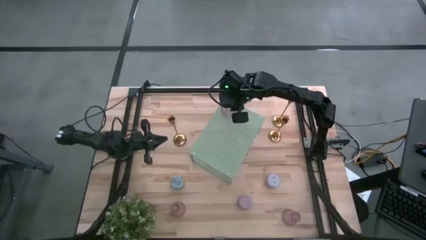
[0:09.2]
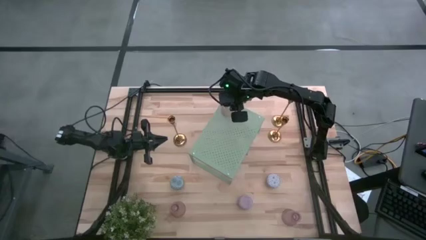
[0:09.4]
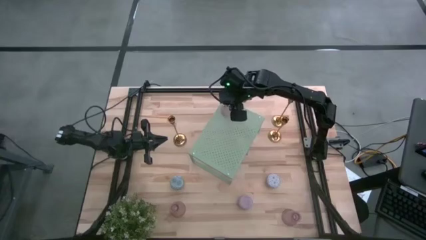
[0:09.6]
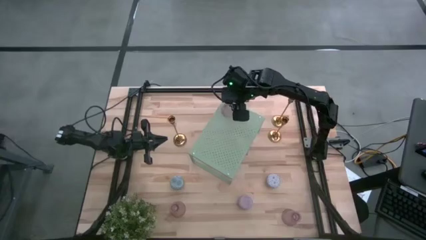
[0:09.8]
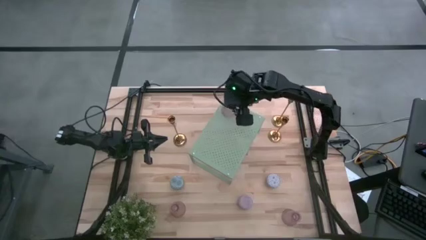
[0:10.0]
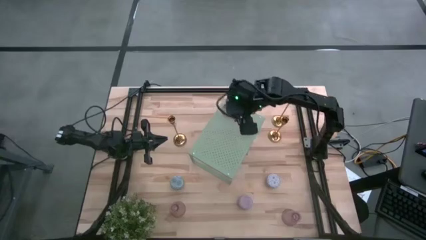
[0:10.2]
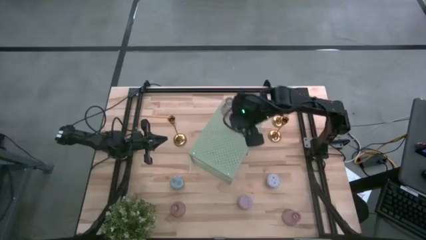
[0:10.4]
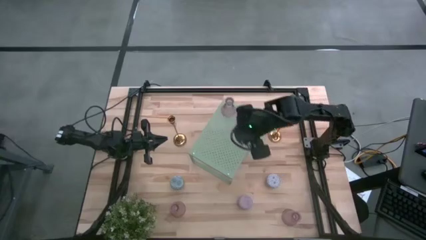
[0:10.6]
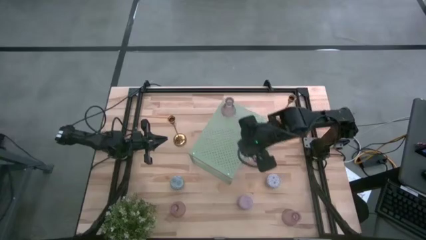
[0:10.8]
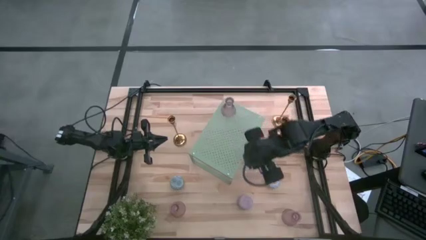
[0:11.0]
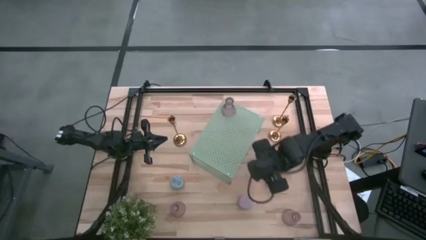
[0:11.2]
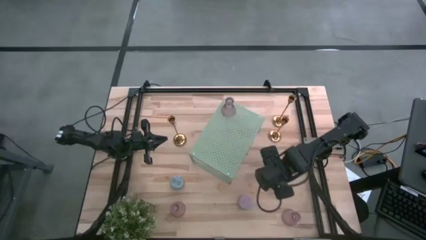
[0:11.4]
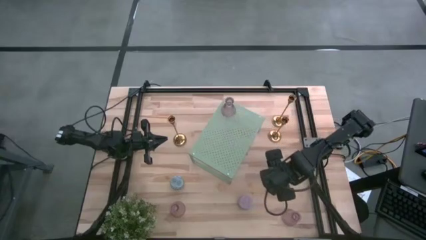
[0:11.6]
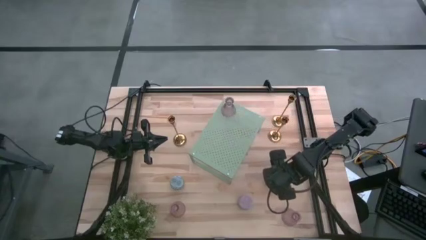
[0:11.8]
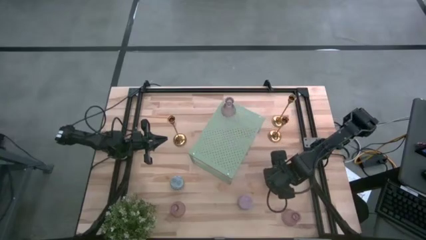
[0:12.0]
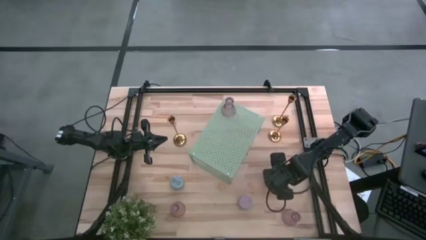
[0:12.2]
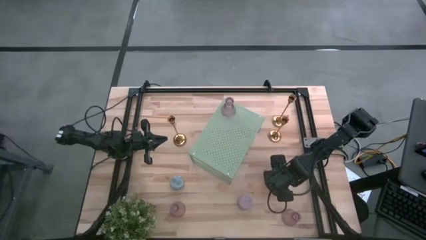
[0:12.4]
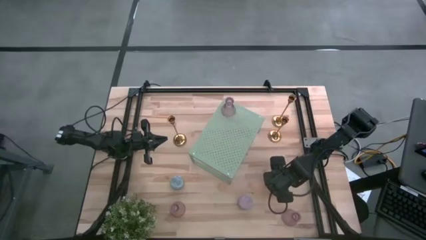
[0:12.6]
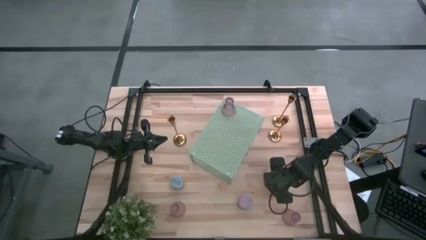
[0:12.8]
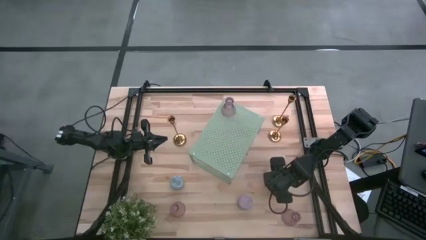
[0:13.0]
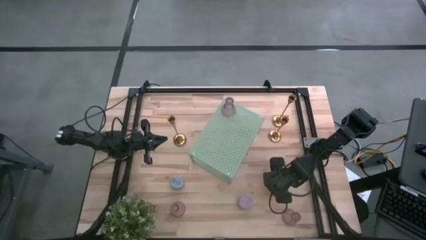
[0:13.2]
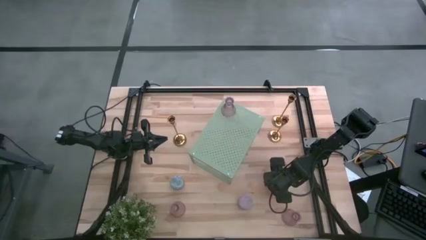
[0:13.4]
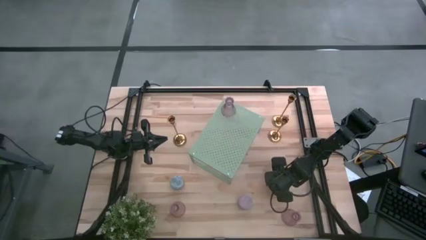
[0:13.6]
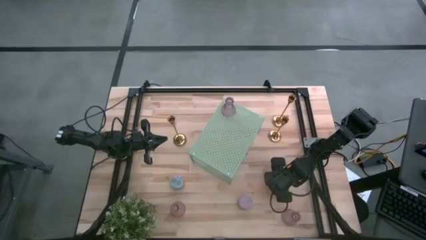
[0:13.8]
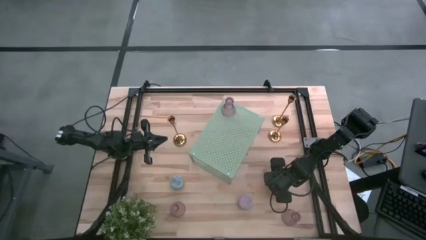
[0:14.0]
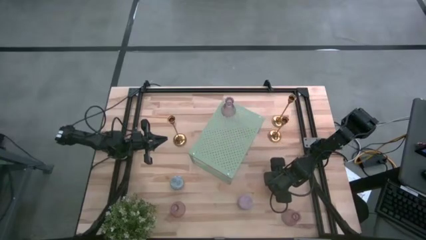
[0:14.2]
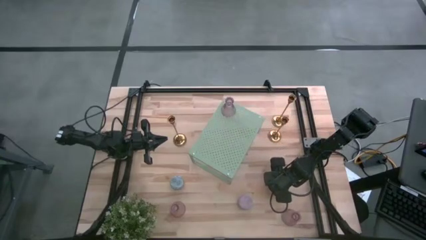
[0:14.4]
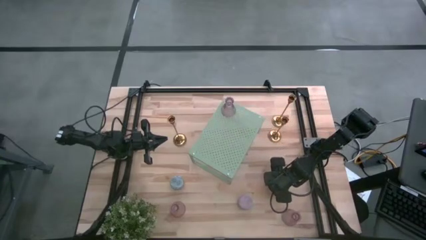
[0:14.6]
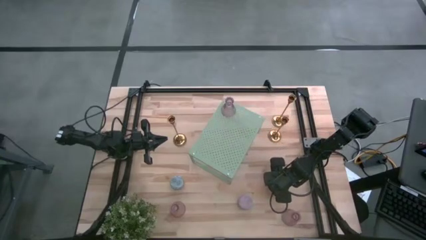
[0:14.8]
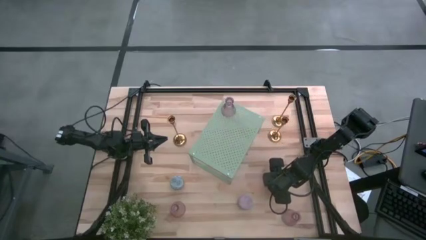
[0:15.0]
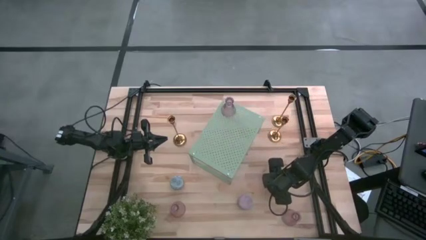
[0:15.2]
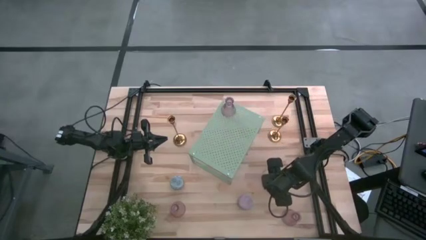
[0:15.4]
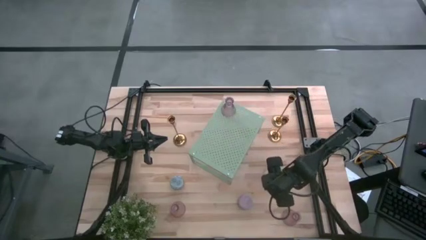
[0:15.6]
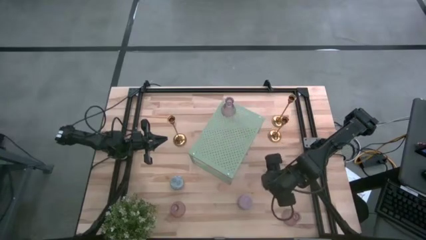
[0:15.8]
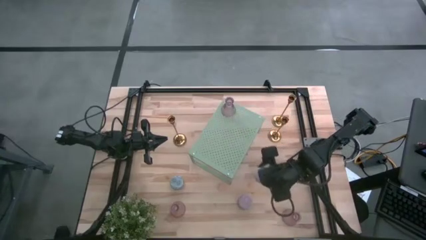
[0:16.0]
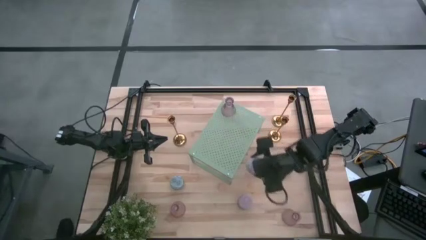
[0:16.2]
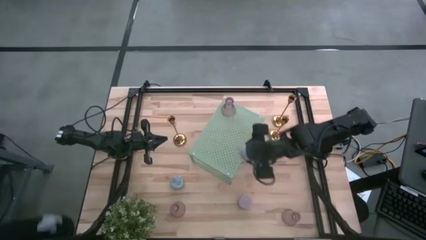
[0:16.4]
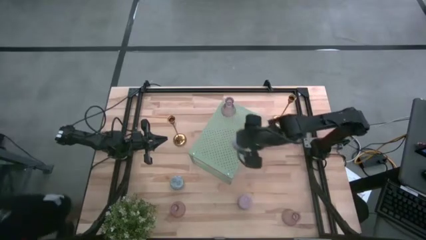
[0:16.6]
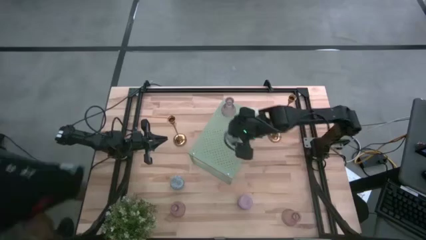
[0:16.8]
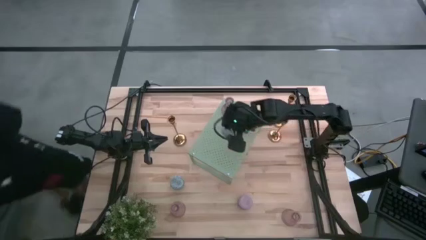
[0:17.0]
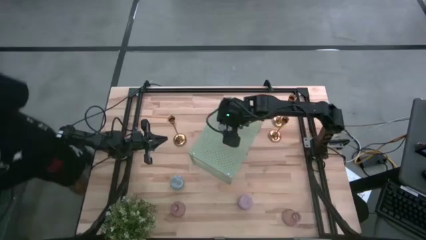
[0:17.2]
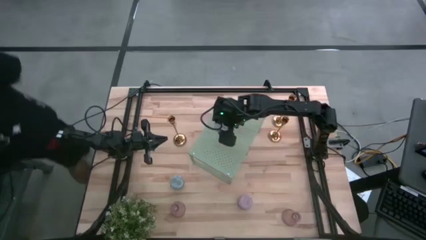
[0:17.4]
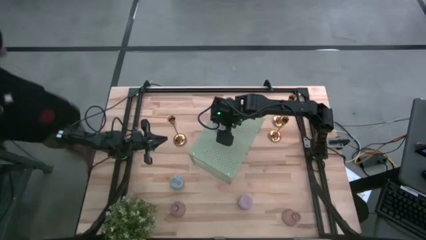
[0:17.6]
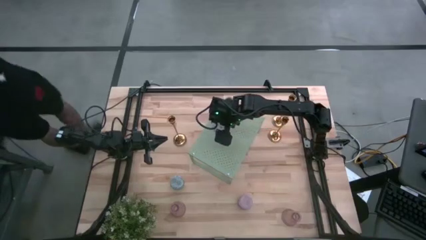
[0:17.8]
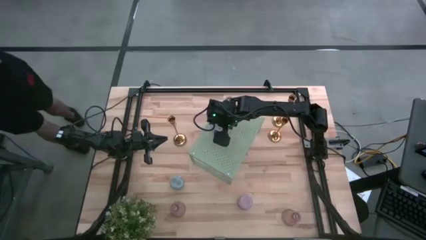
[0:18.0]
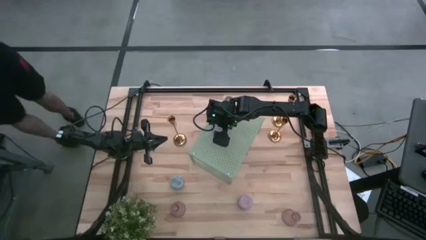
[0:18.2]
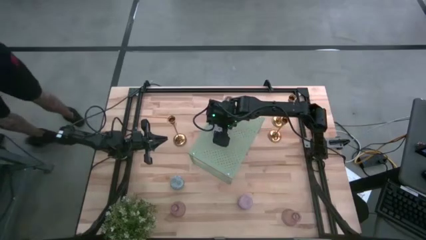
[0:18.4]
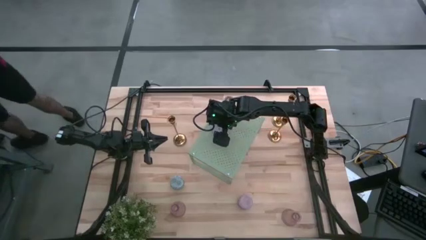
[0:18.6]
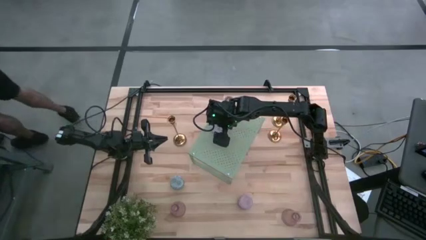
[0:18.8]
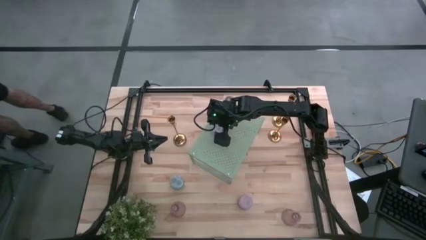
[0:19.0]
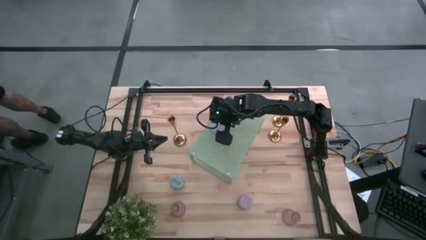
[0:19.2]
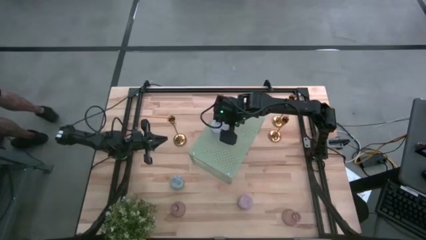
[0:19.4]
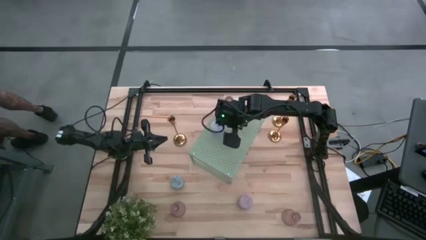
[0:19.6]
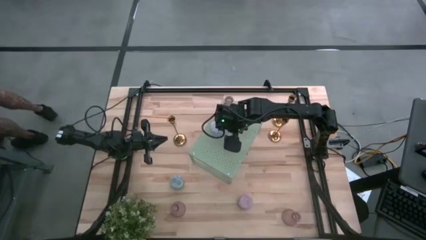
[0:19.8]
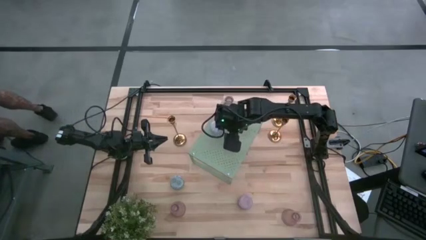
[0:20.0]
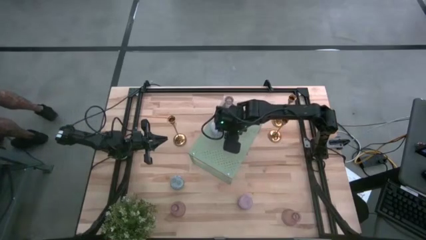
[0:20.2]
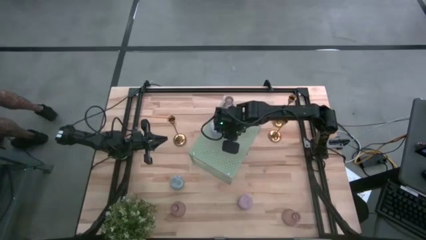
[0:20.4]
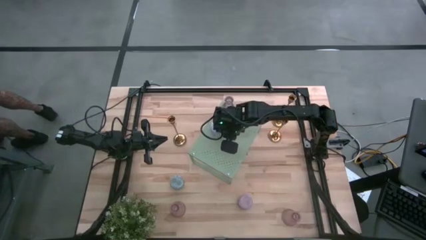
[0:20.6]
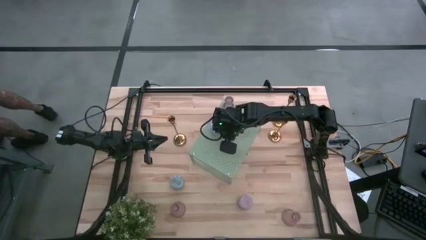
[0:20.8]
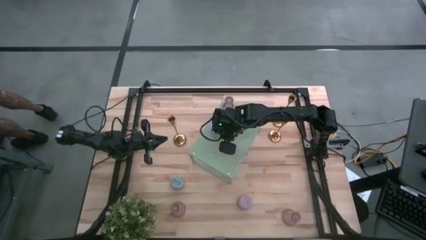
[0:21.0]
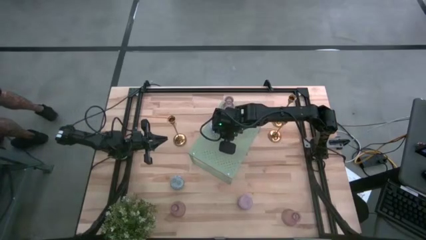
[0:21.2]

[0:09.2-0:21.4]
Task: Pick & Place candle stick holders
Put the white scented candle on the shelf

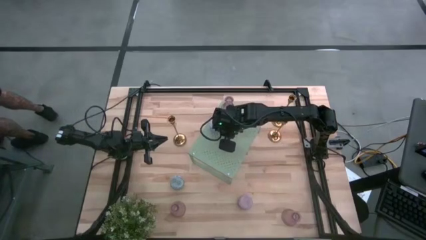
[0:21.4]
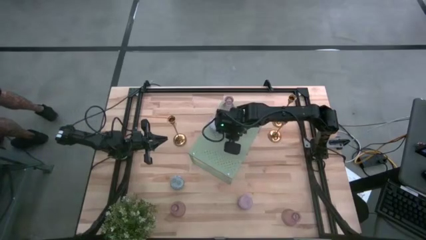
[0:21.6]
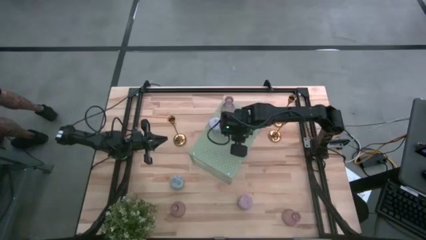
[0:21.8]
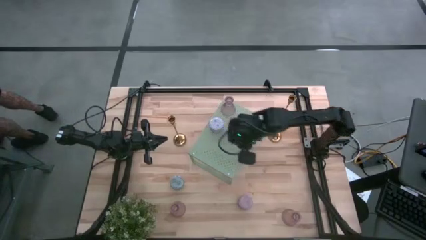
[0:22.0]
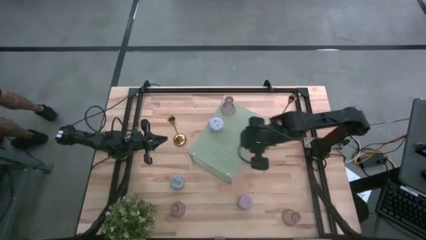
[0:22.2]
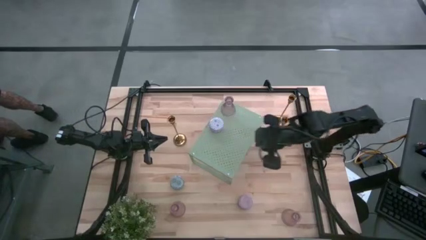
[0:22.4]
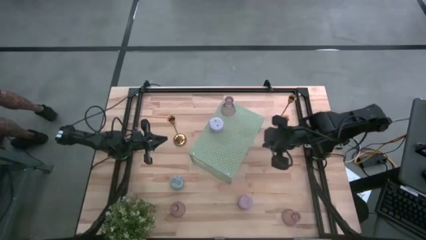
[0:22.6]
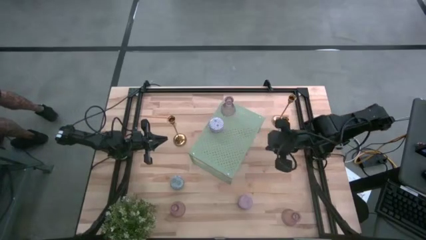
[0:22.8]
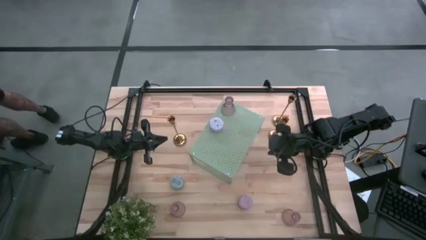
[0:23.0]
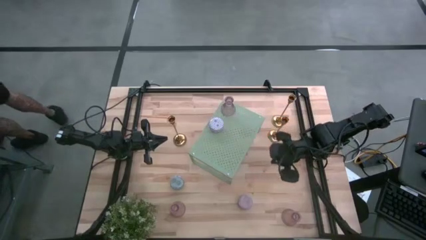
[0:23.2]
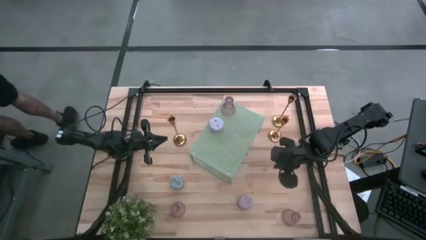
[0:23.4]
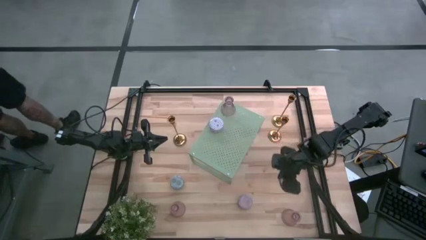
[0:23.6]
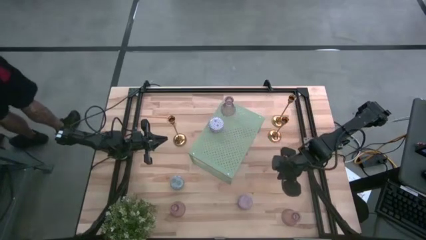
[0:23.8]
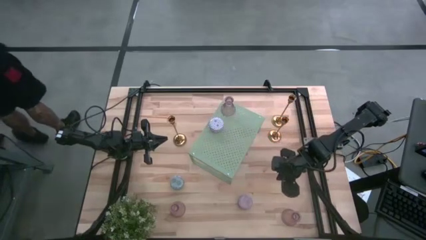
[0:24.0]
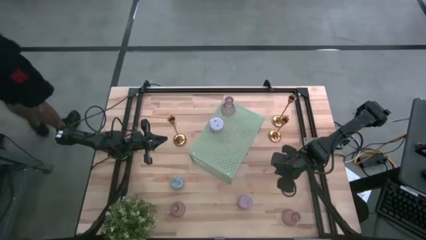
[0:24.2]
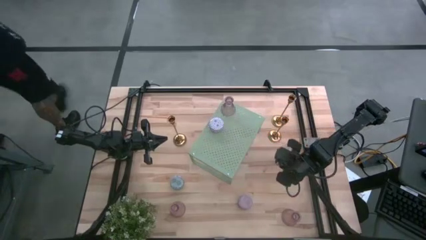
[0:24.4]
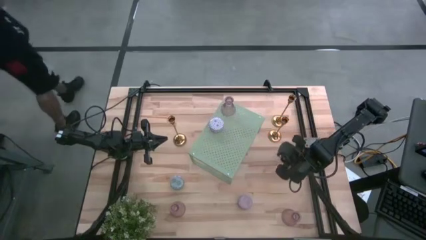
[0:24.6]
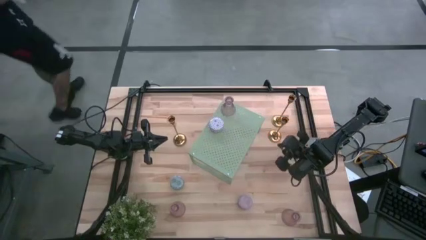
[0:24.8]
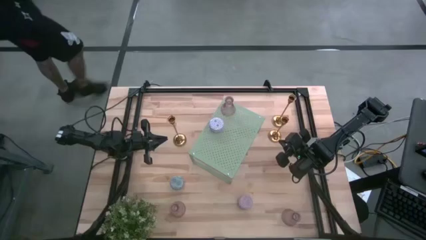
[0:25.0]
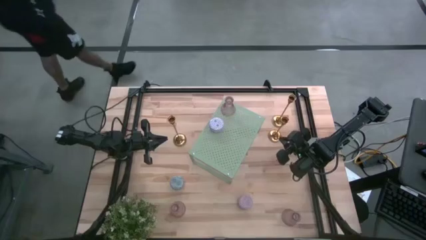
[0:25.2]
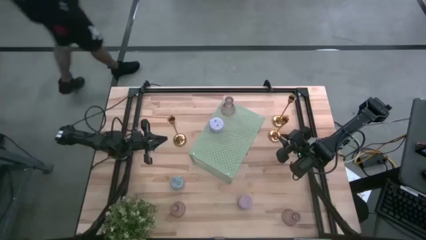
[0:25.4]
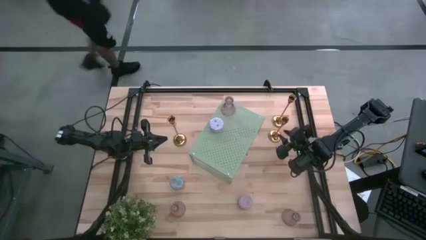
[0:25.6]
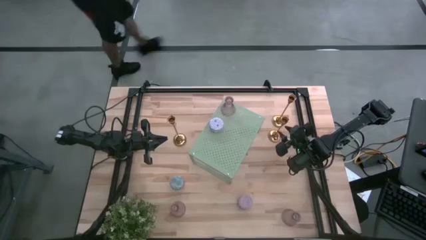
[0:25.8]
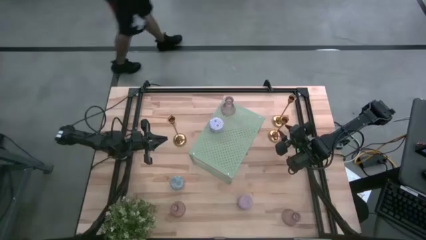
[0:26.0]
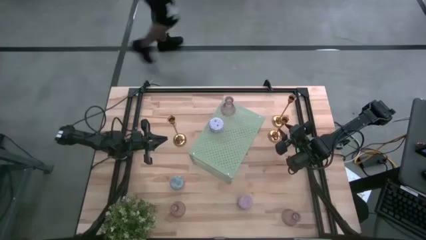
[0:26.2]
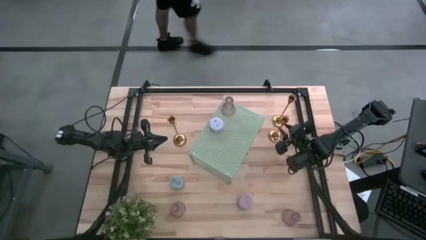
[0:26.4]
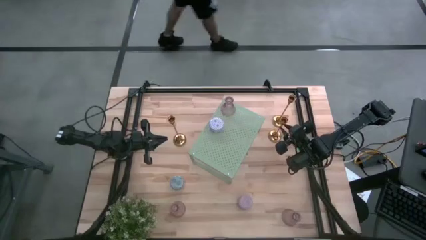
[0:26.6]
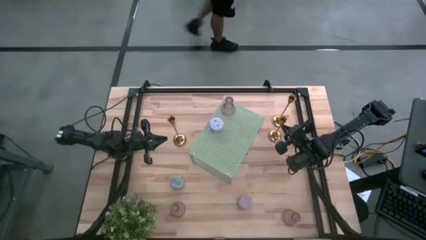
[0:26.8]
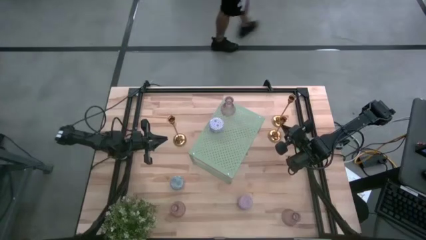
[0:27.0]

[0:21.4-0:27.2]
Put the bottom right gold candle holder on the shelf
